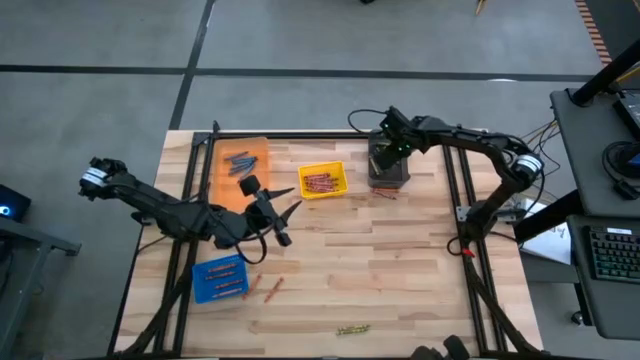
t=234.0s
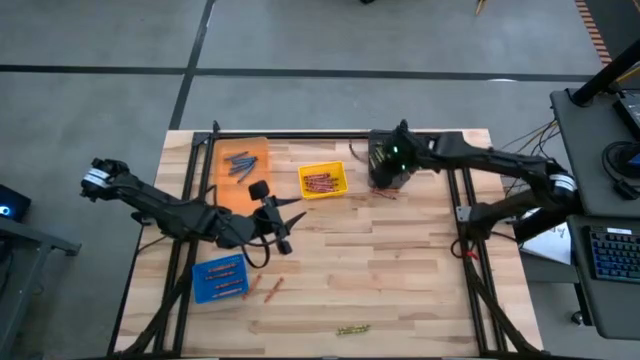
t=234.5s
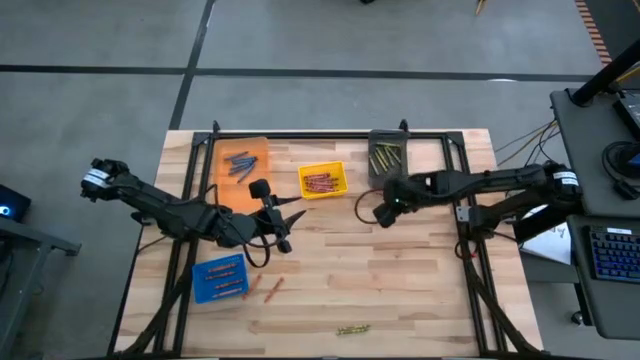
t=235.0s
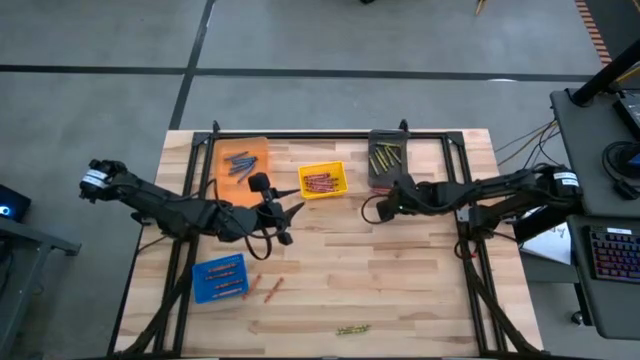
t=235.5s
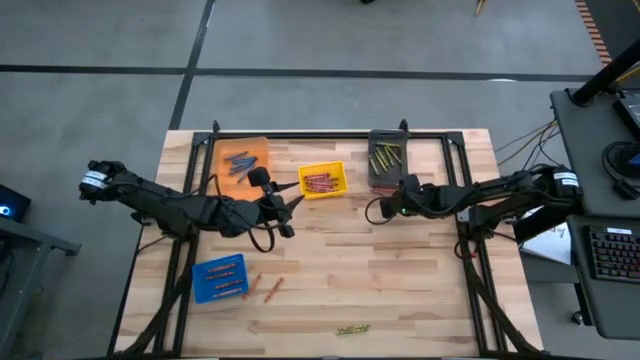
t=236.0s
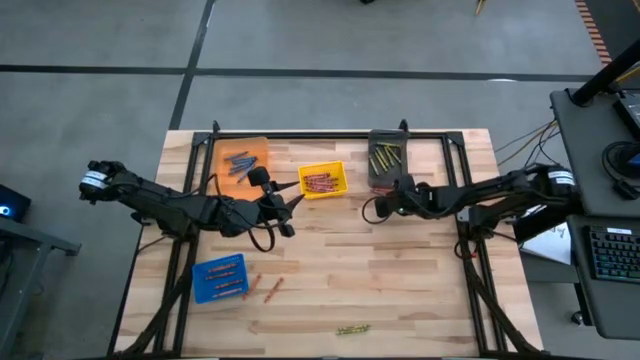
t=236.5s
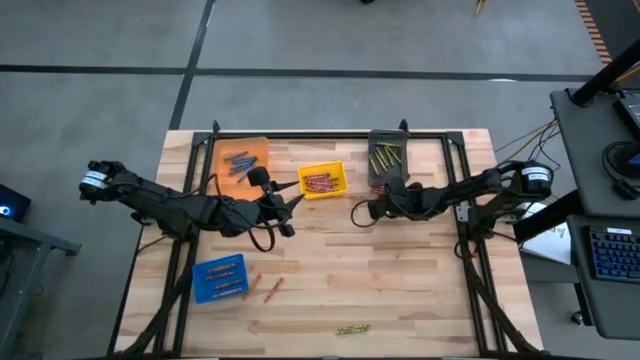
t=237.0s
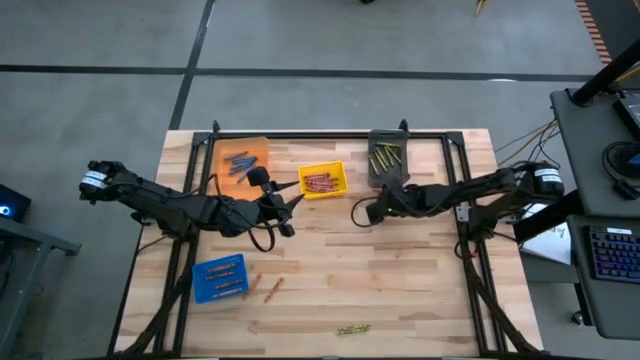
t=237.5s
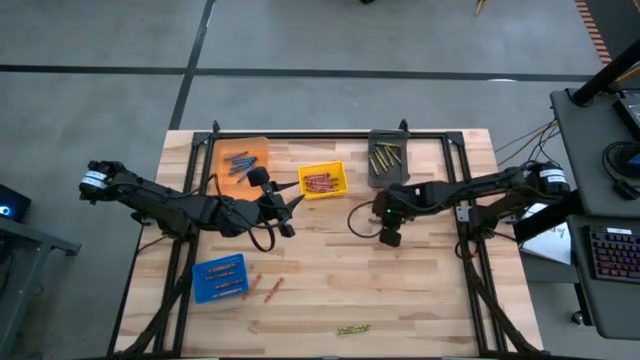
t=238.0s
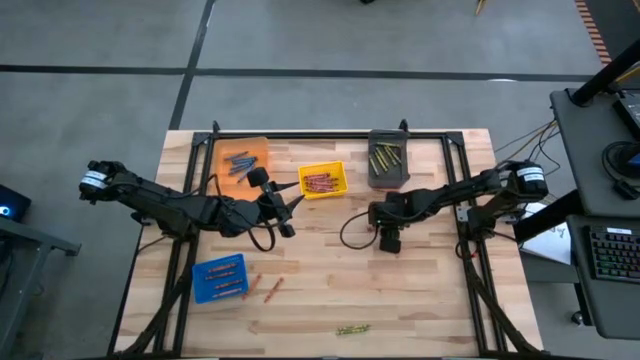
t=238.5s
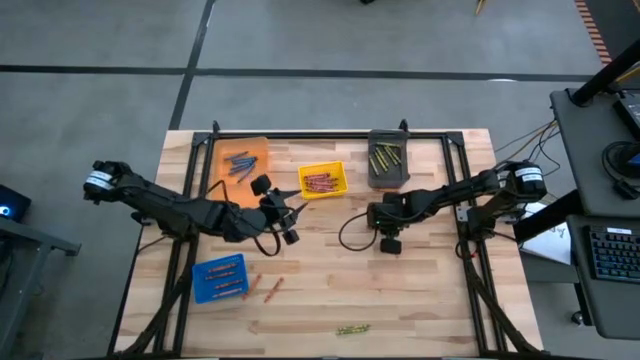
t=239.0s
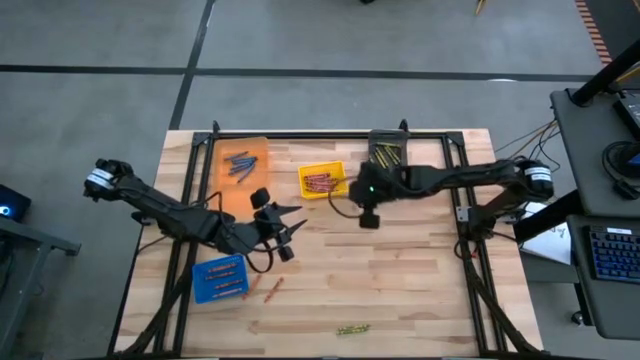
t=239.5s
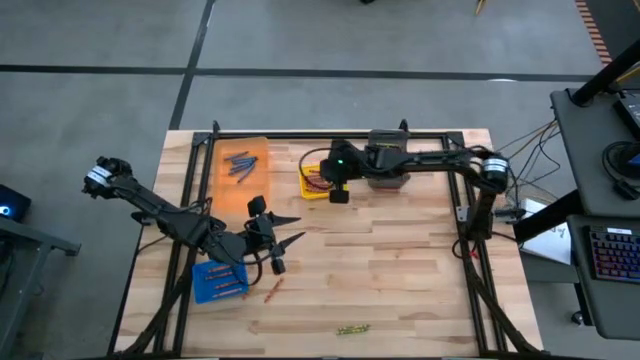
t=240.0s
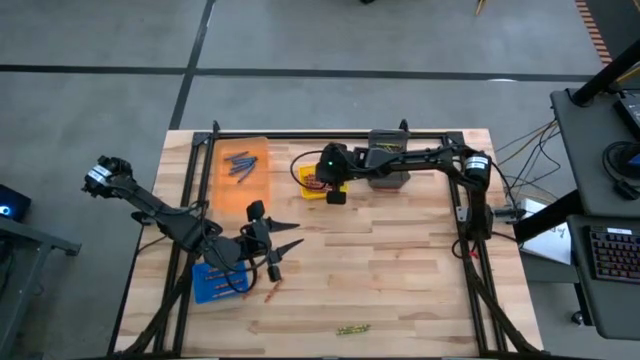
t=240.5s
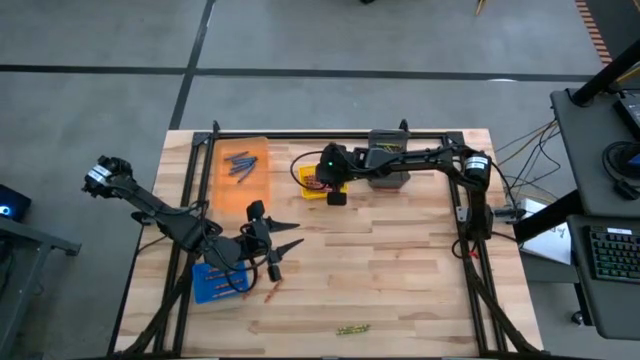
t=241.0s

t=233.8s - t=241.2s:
Task: Sort crayons
Put the red crayon into the yellow bin

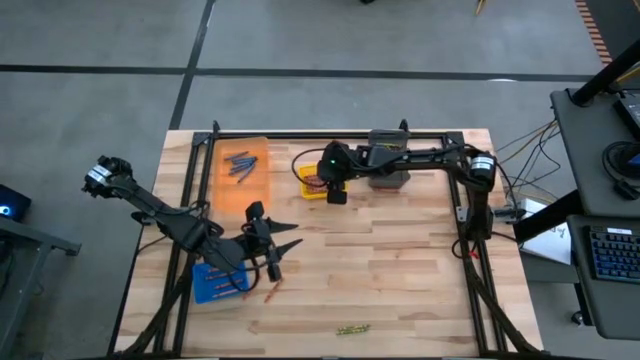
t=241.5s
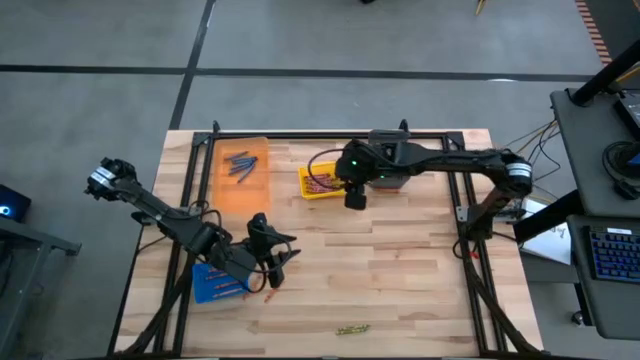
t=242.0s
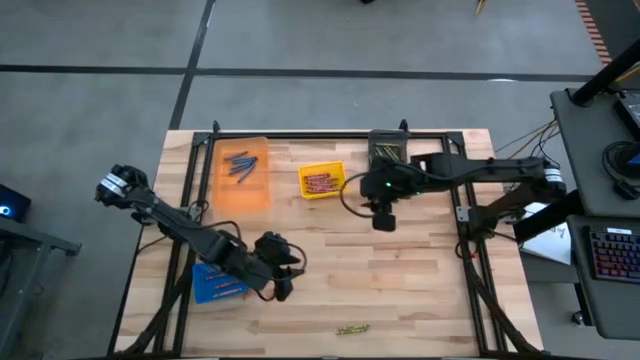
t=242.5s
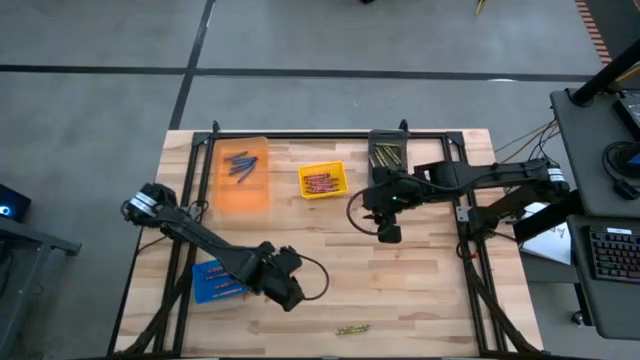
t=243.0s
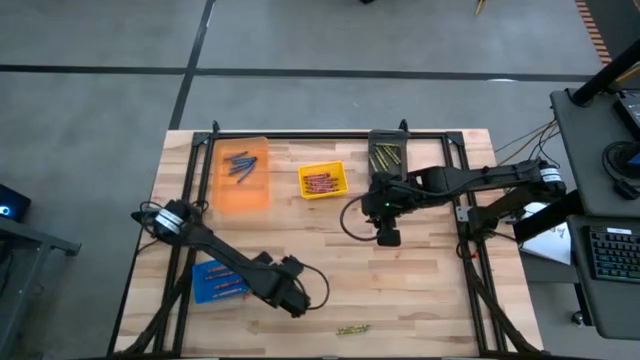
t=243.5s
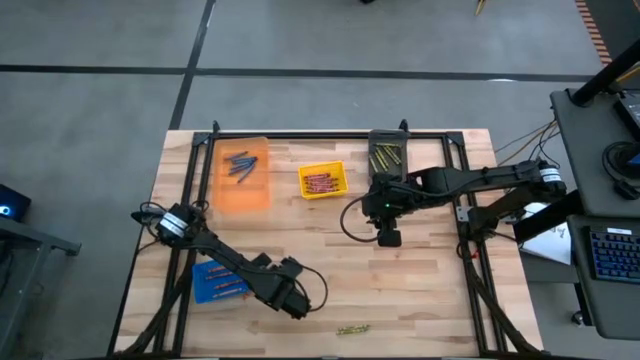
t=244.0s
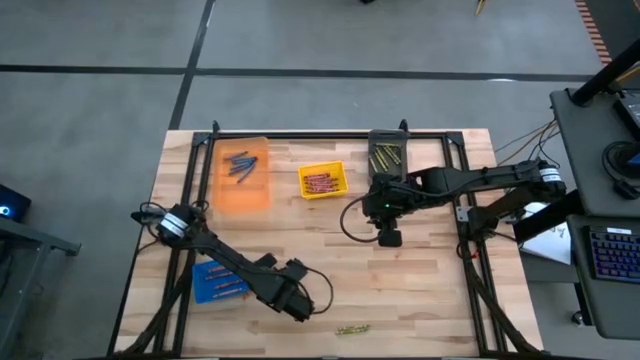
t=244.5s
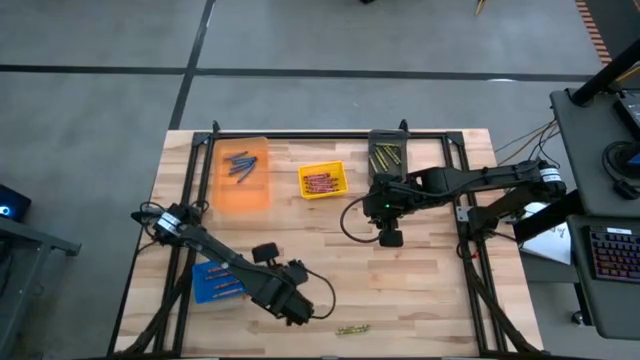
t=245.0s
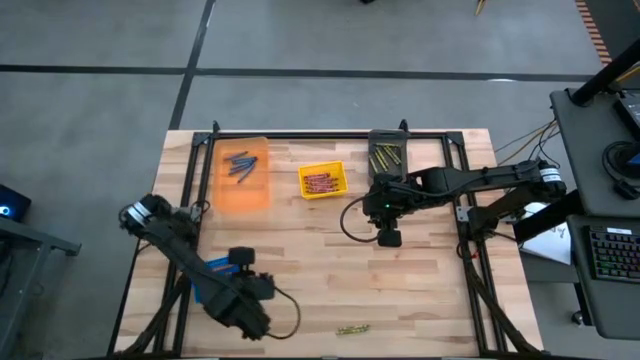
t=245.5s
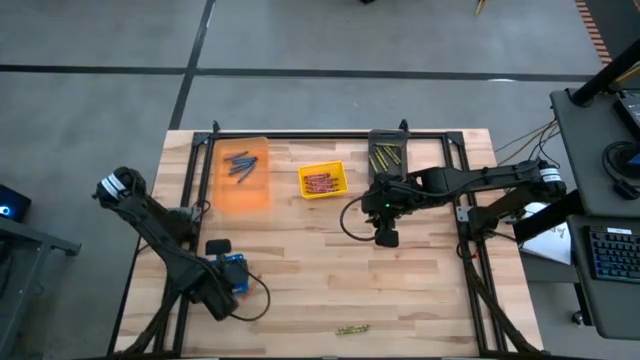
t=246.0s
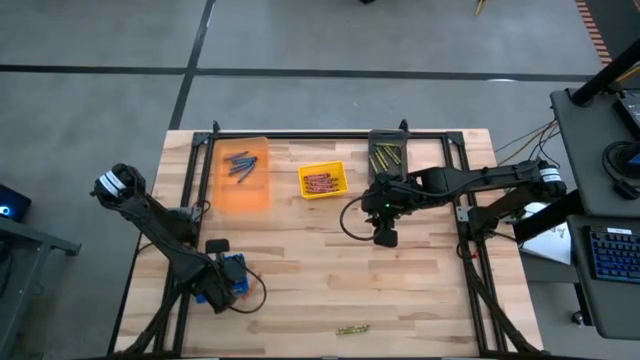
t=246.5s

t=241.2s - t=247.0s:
Put the orange crayon into the blue bin
